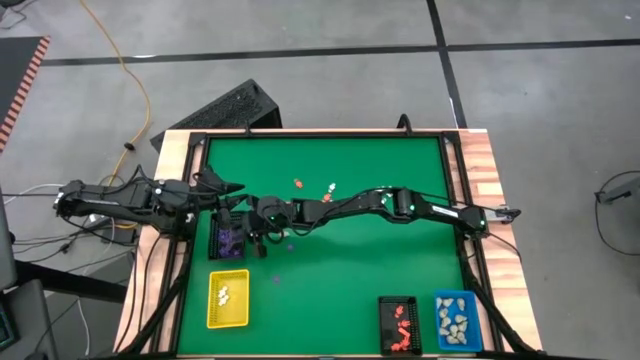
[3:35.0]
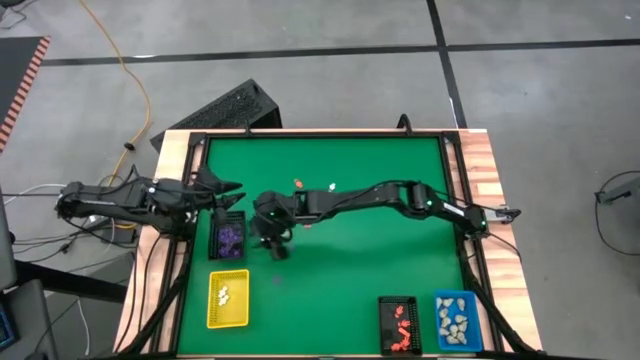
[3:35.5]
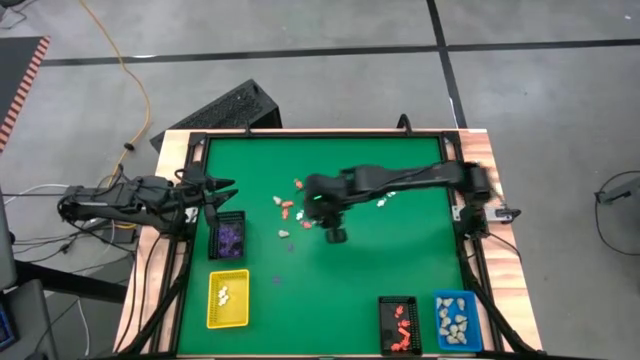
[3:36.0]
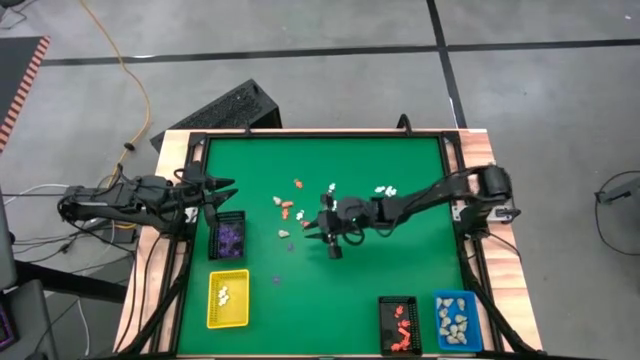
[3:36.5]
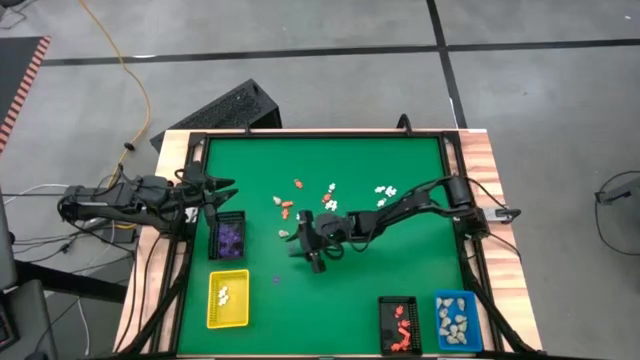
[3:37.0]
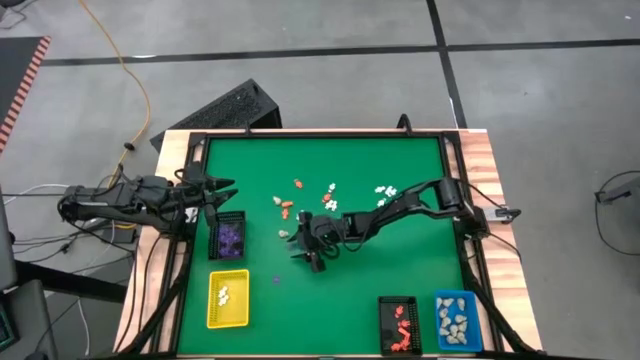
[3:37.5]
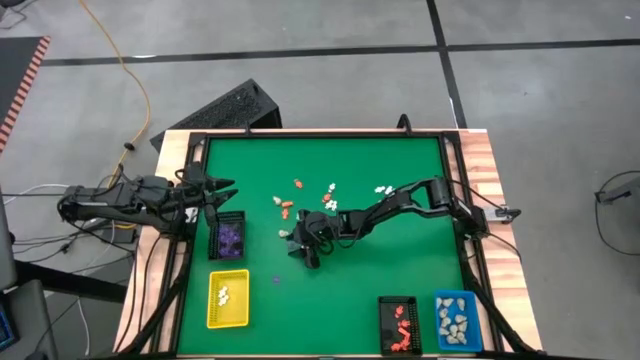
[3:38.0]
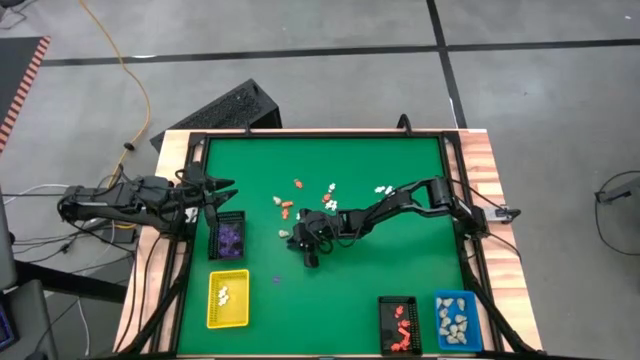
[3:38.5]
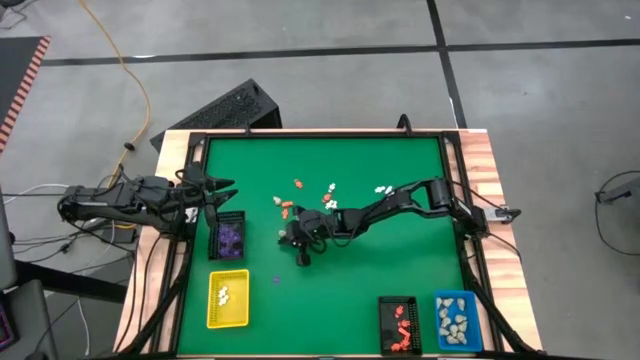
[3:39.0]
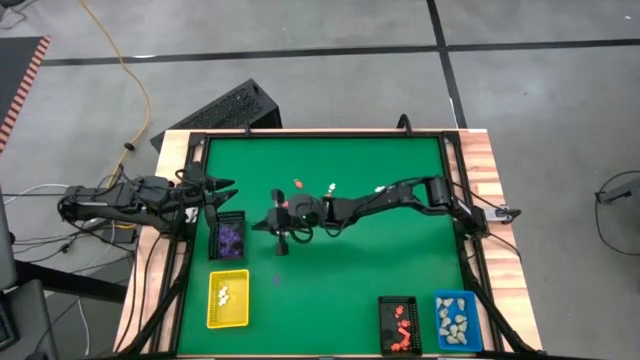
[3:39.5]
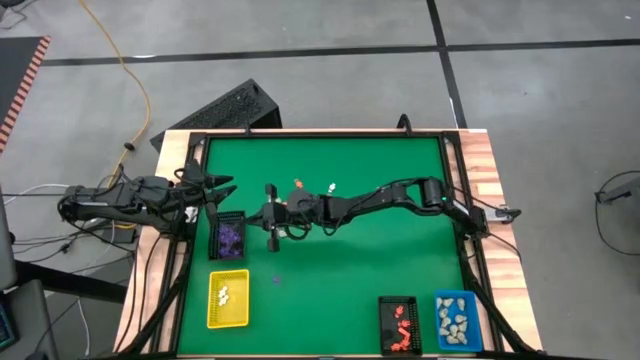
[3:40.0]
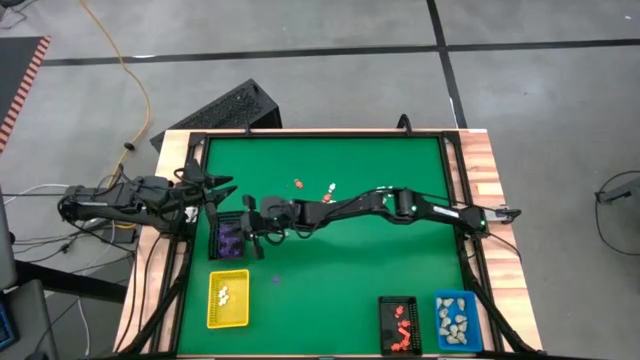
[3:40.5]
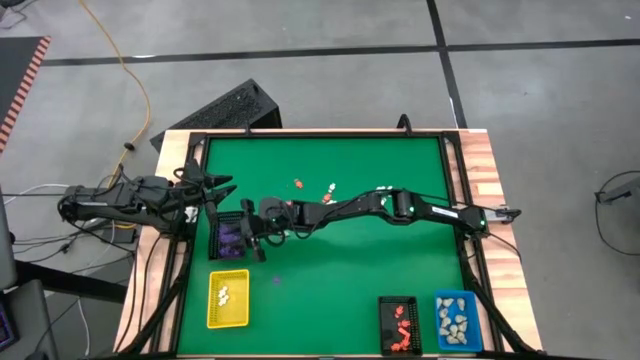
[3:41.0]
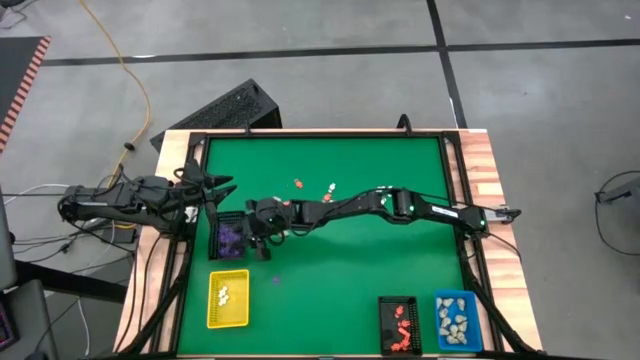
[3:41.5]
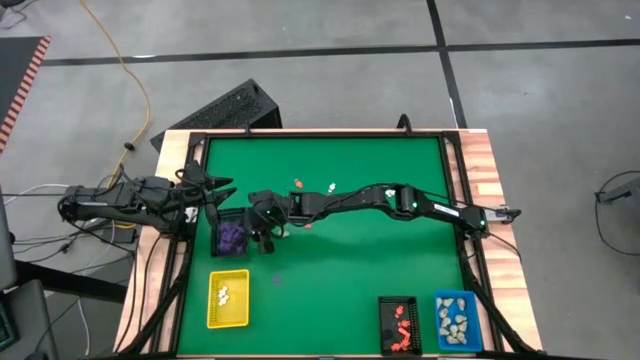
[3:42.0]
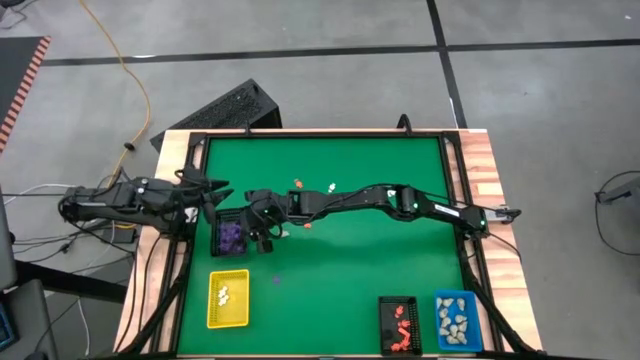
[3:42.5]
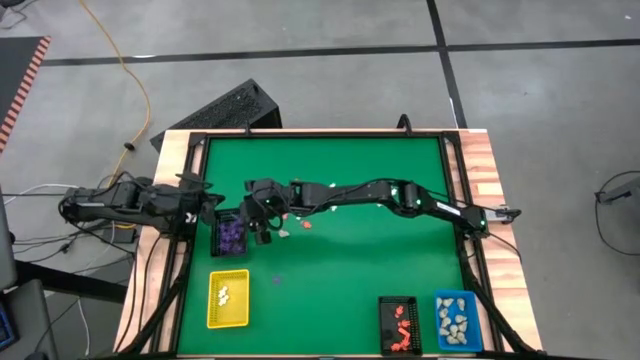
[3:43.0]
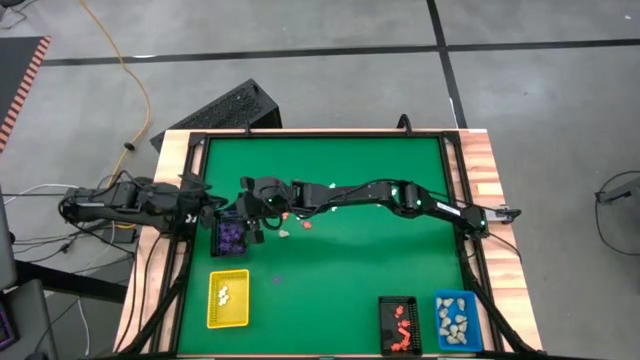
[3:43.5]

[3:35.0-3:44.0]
Task: Sort Halloween decoration
Put the purple spider toy into the top black basket

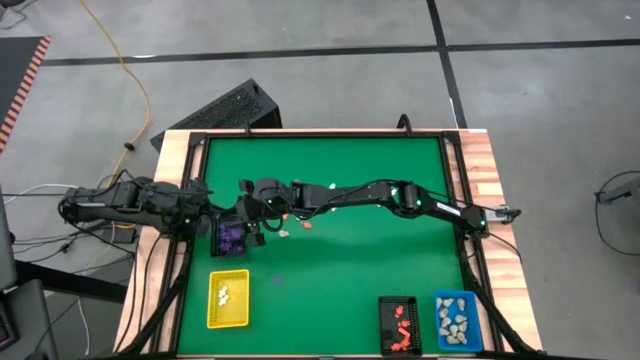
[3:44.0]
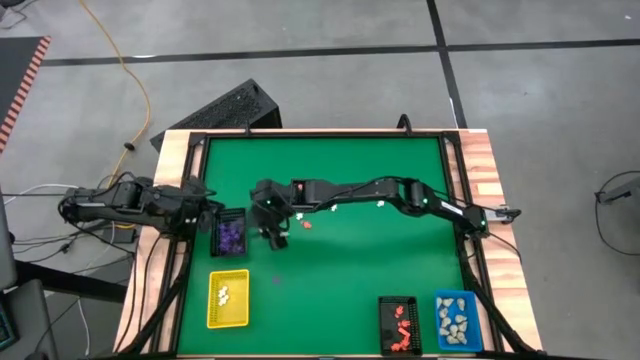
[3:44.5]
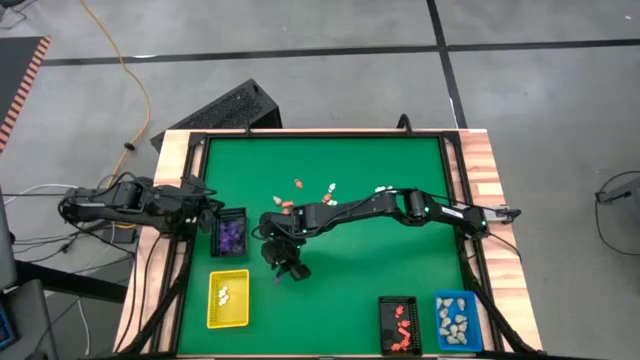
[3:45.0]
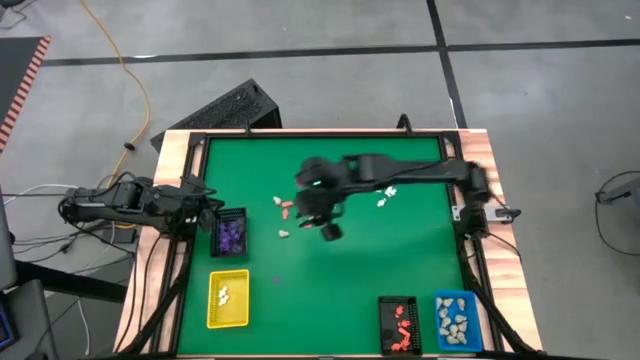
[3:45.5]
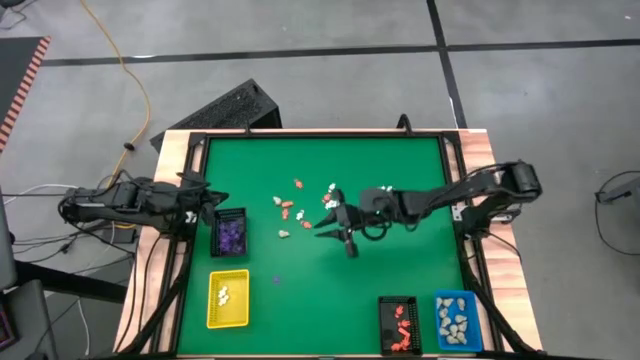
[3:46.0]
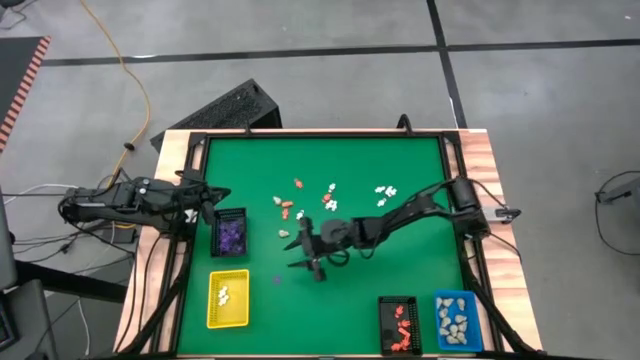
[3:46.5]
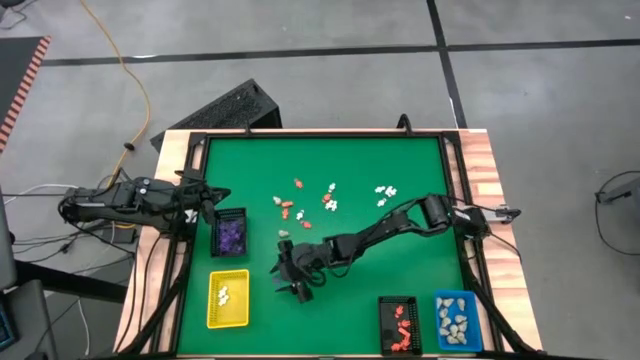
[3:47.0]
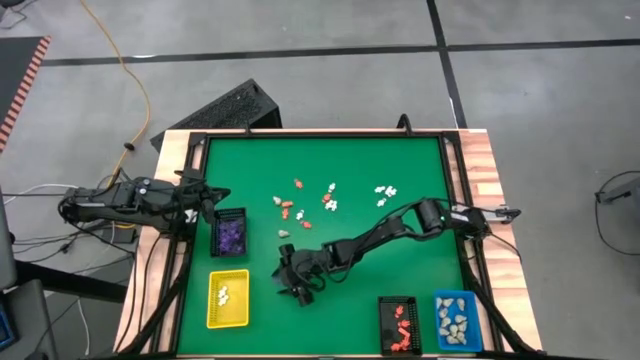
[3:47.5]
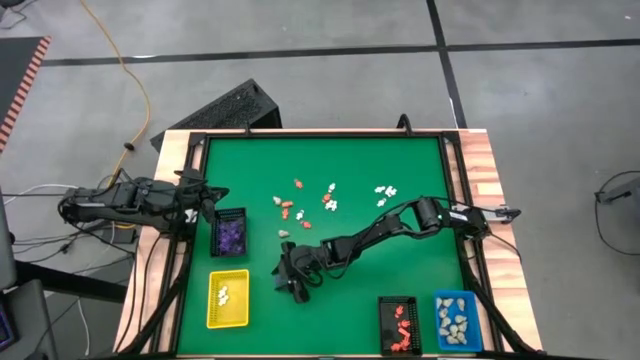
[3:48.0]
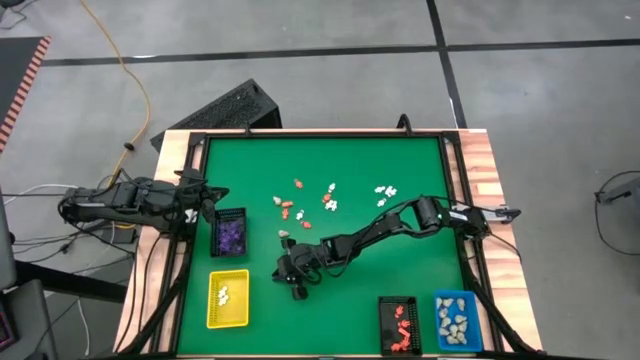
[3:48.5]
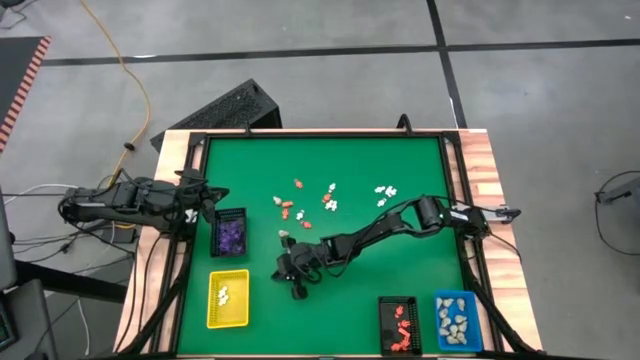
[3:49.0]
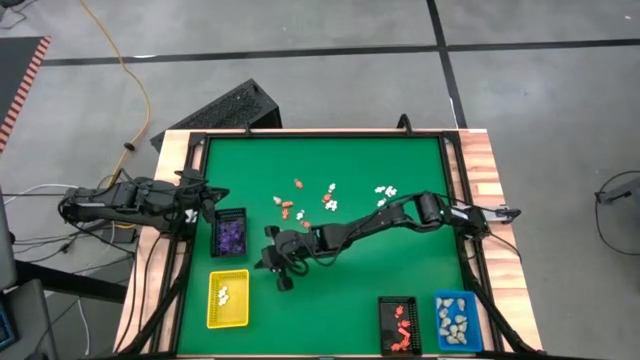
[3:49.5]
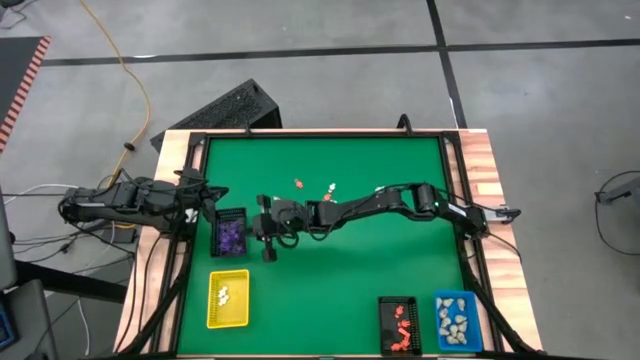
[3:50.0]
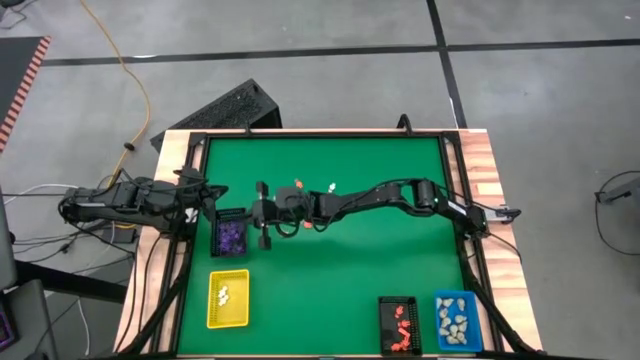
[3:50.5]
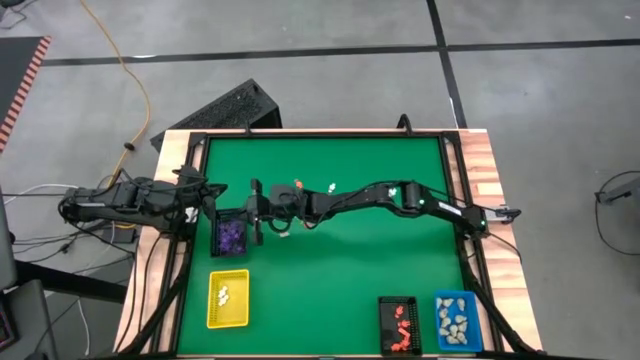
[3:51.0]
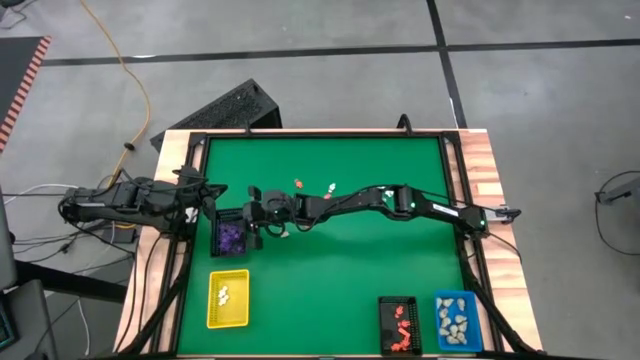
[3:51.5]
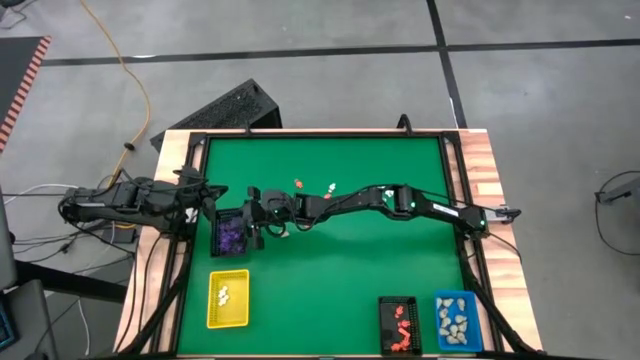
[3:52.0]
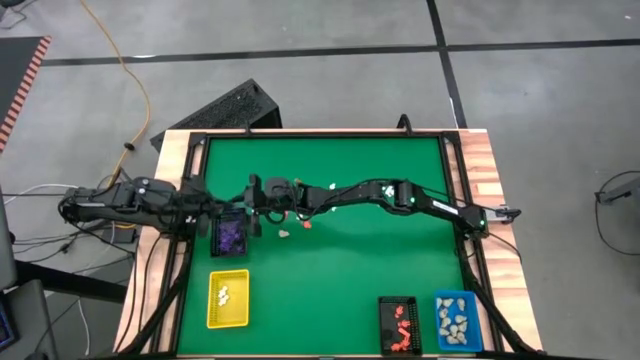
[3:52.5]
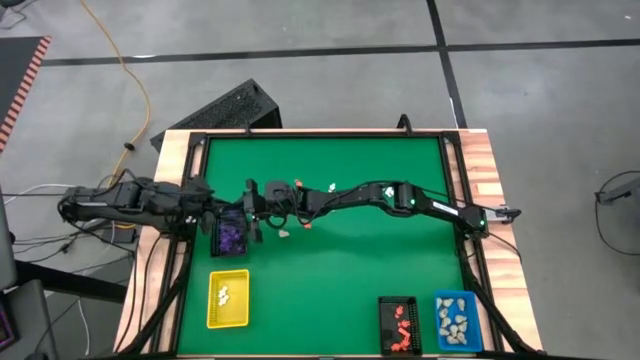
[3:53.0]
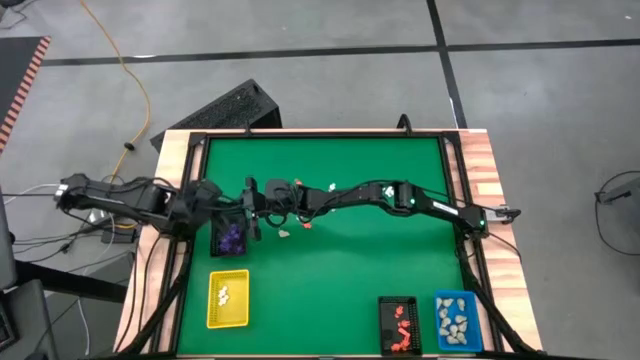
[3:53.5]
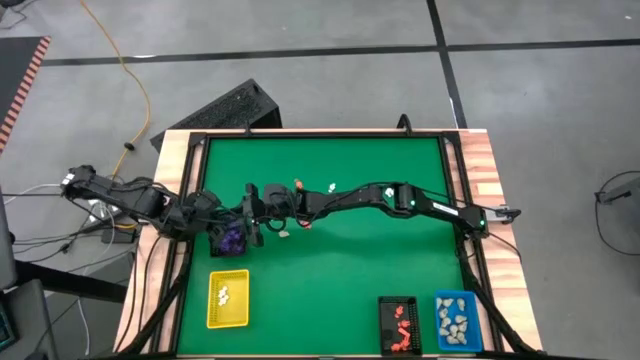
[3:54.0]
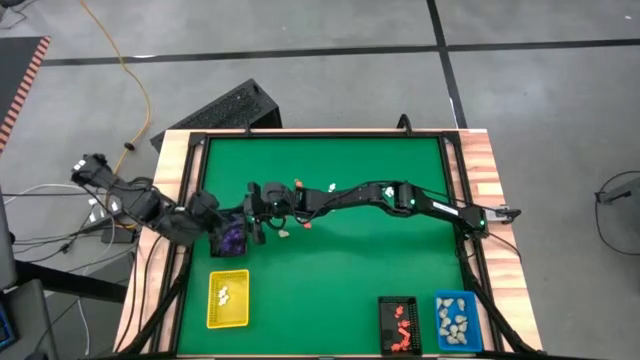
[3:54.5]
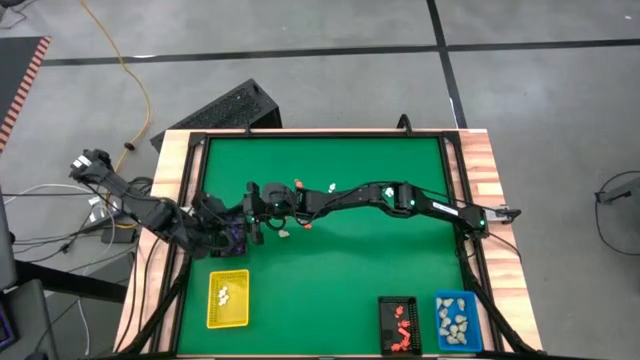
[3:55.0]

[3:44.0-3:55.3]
Put the purple spider toy into the top black basket

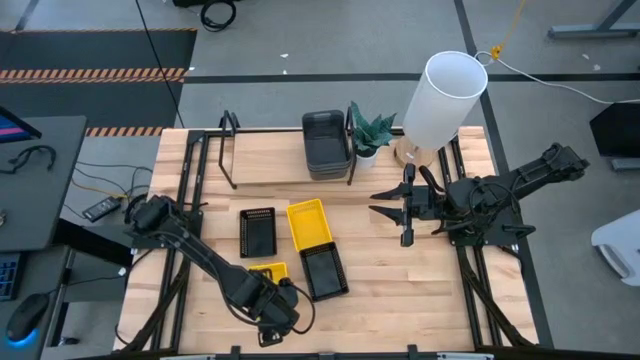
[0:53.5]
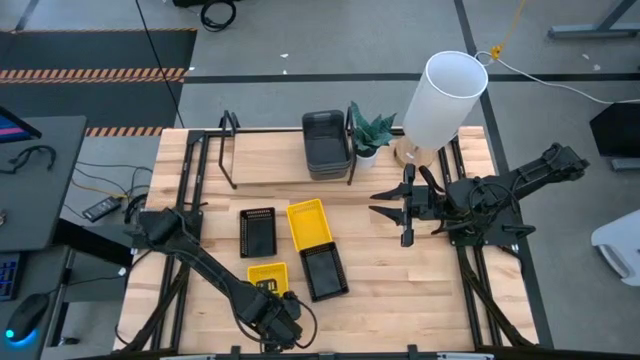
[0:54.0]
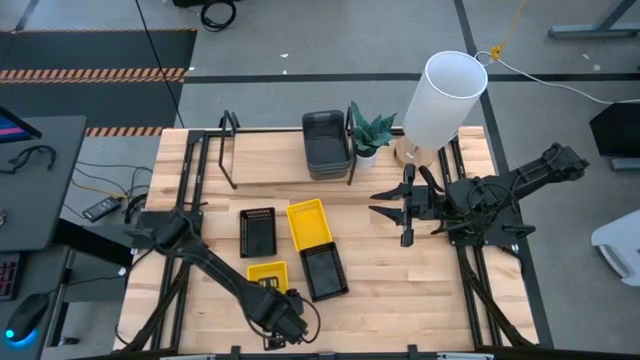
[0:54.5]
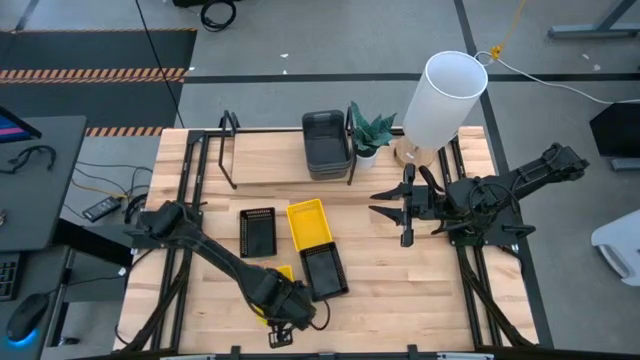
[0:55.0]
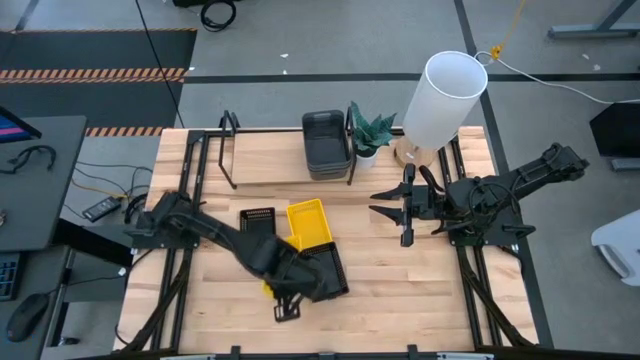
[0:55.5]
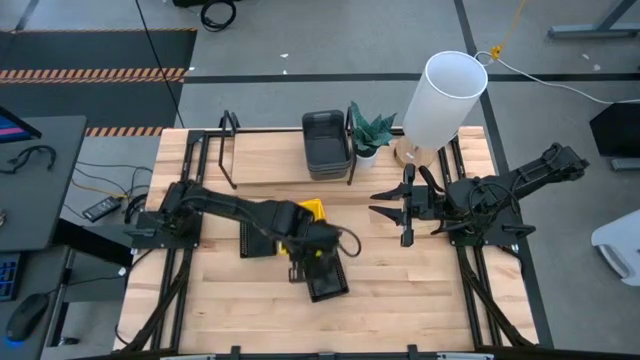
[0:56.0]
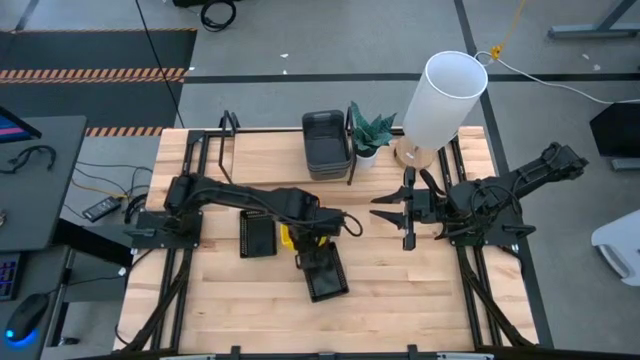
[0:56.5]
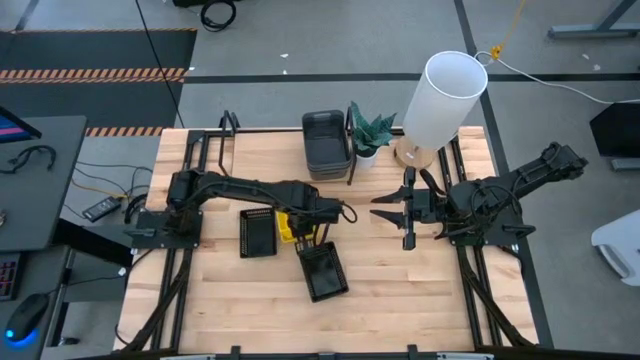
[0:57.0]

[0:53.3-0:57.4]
Task: Stack baskets on shelf by color
Stack the bottom yellow bins on top of the top yellow bin
